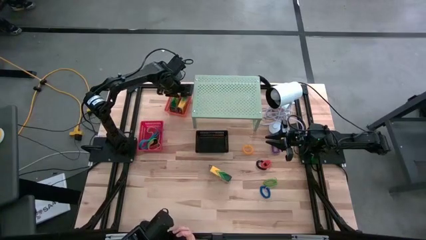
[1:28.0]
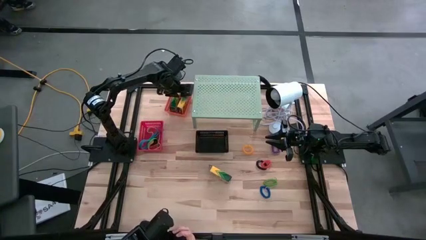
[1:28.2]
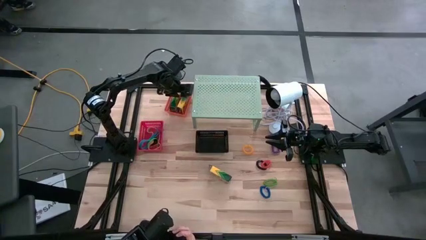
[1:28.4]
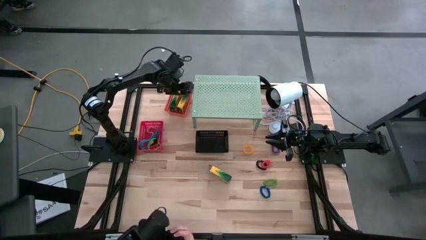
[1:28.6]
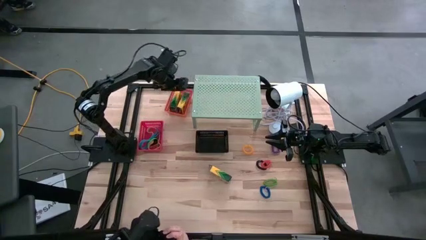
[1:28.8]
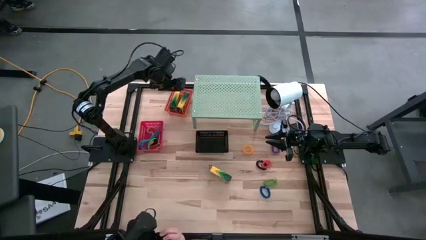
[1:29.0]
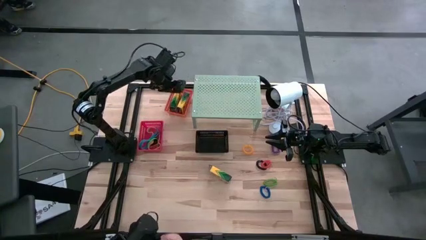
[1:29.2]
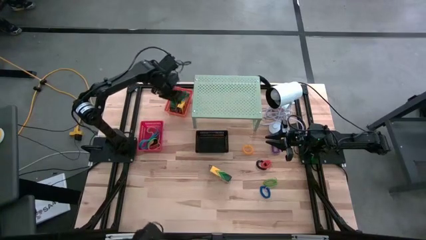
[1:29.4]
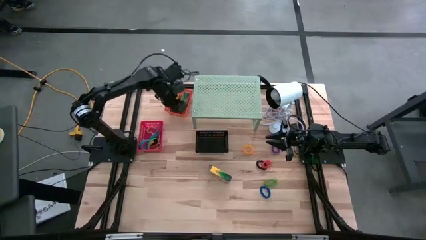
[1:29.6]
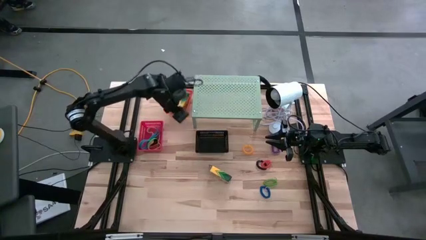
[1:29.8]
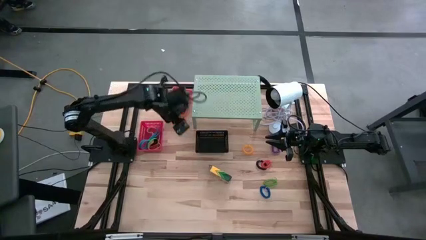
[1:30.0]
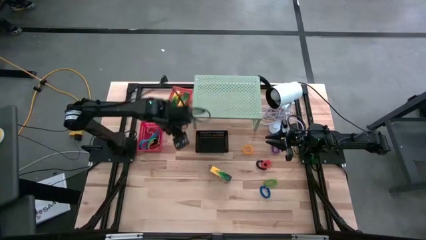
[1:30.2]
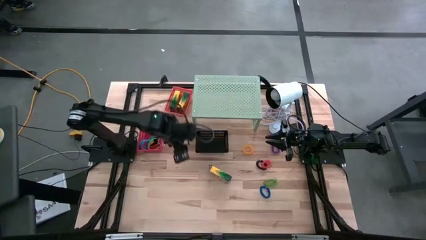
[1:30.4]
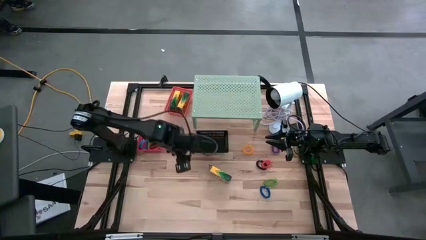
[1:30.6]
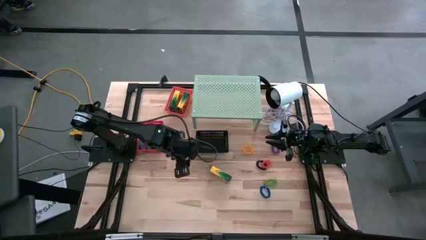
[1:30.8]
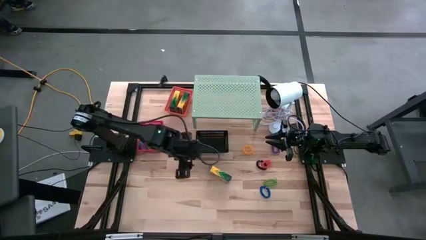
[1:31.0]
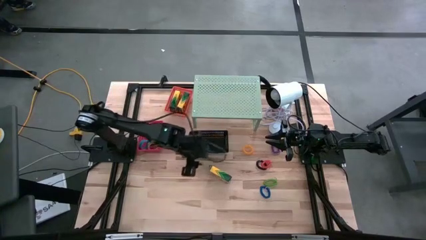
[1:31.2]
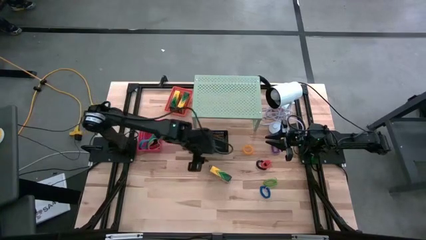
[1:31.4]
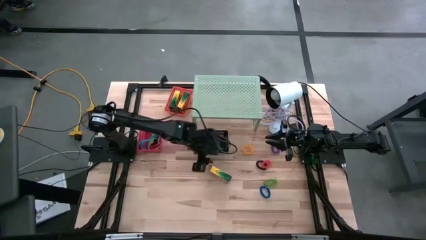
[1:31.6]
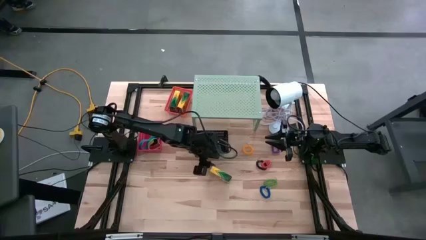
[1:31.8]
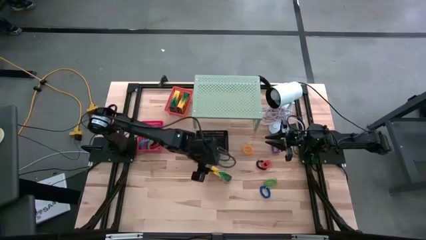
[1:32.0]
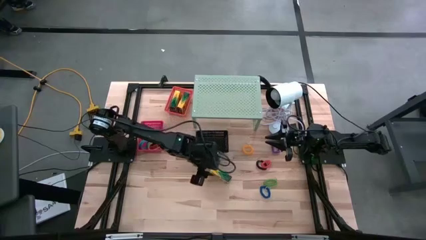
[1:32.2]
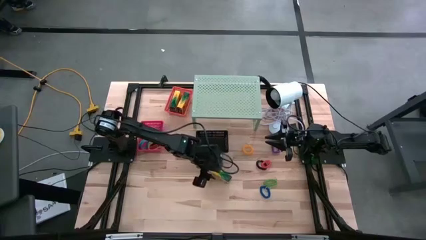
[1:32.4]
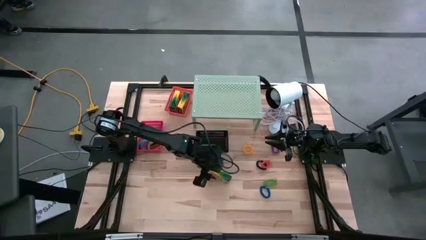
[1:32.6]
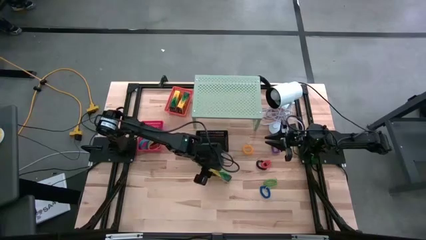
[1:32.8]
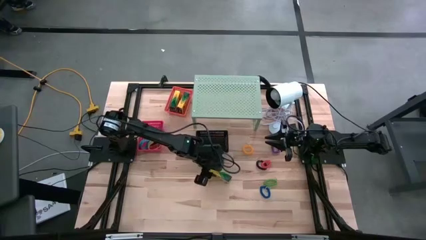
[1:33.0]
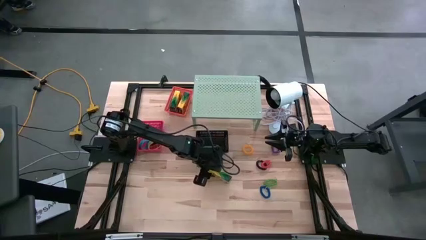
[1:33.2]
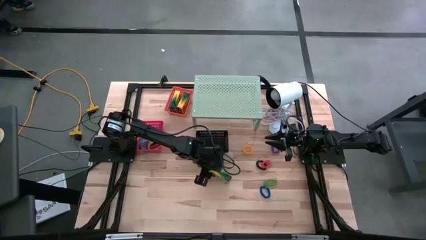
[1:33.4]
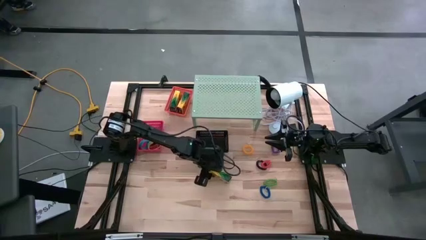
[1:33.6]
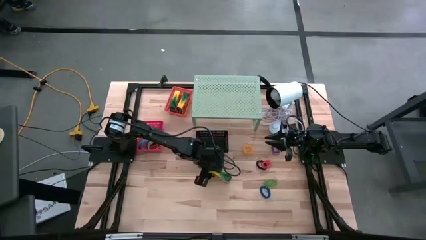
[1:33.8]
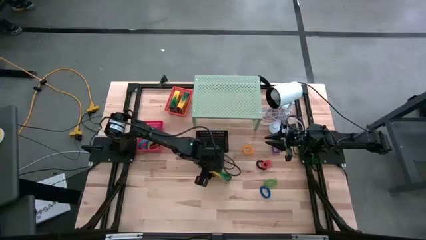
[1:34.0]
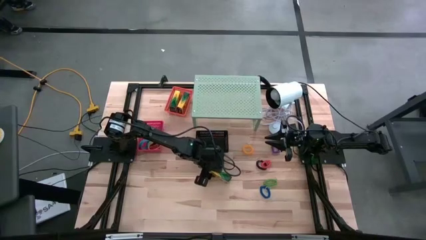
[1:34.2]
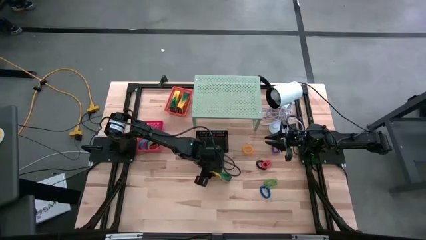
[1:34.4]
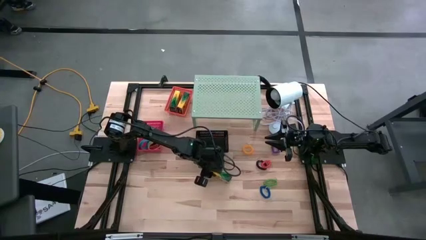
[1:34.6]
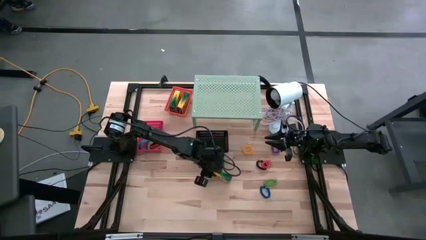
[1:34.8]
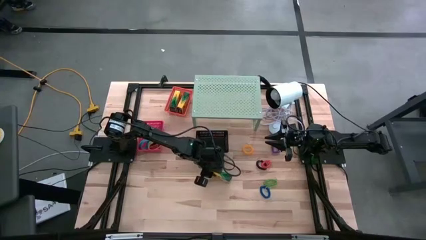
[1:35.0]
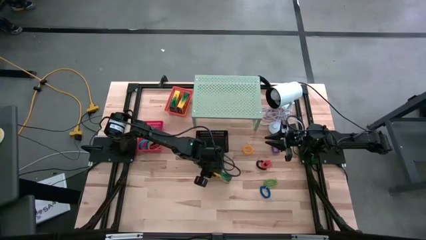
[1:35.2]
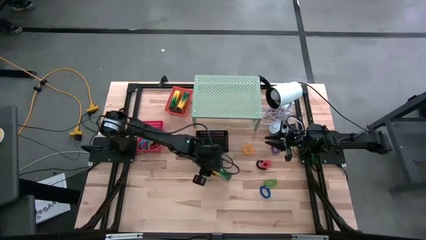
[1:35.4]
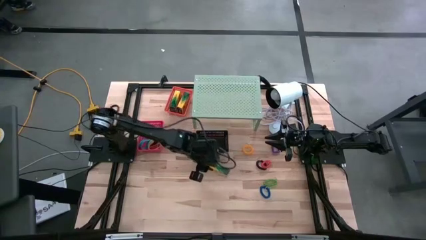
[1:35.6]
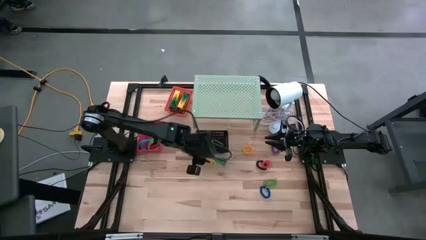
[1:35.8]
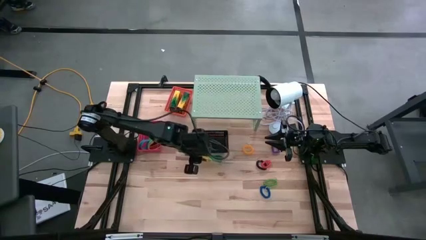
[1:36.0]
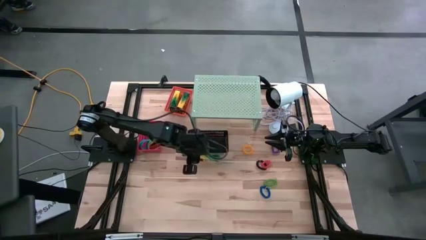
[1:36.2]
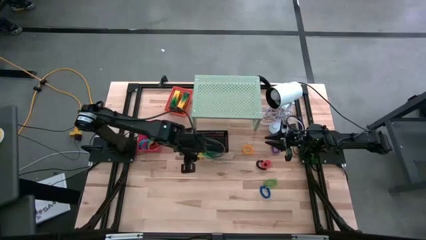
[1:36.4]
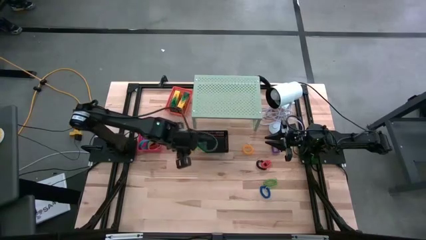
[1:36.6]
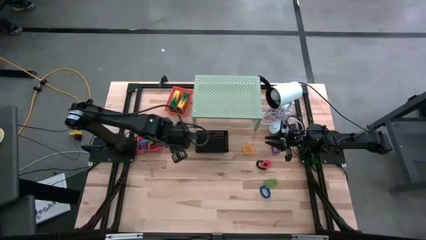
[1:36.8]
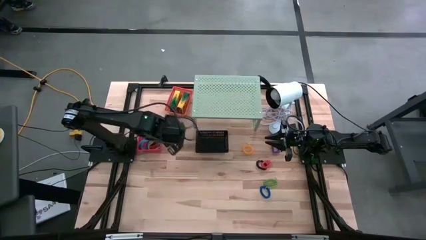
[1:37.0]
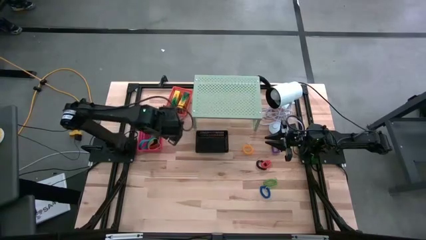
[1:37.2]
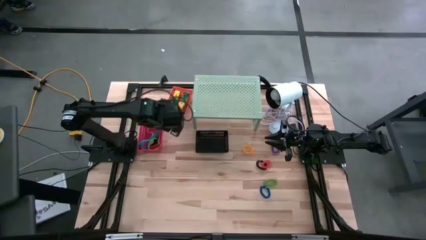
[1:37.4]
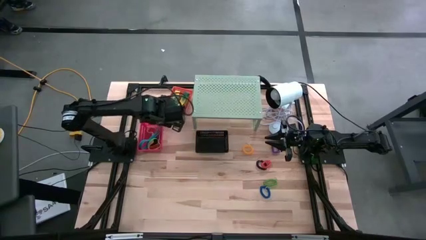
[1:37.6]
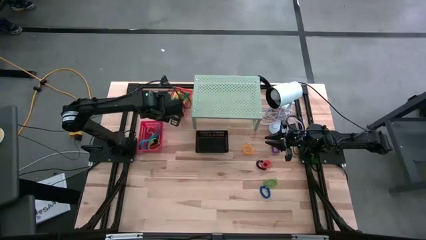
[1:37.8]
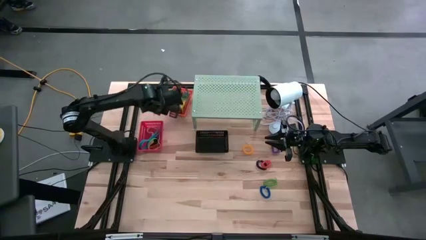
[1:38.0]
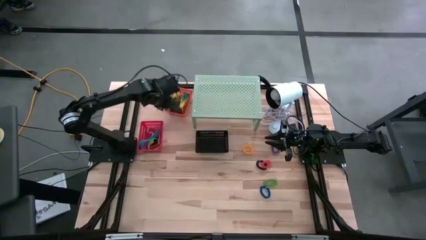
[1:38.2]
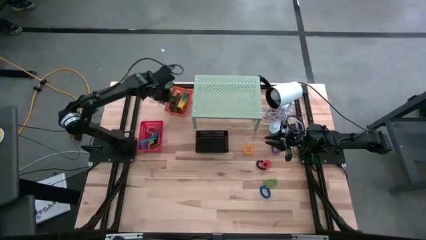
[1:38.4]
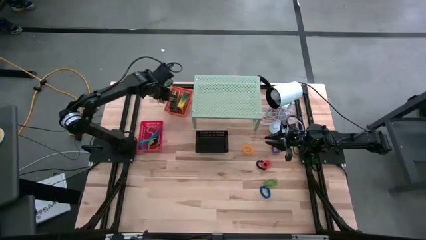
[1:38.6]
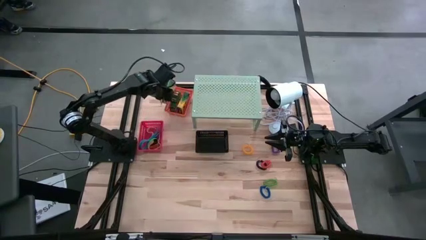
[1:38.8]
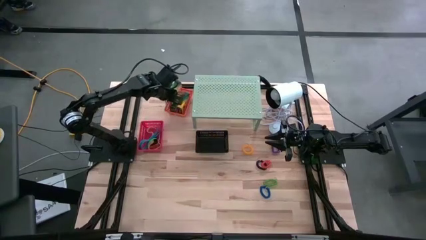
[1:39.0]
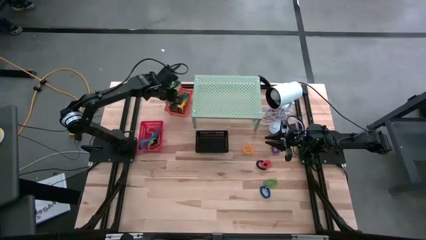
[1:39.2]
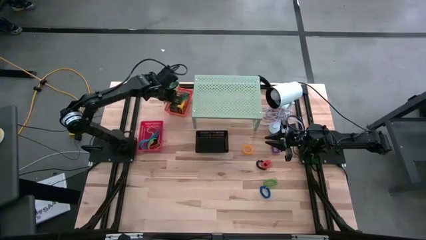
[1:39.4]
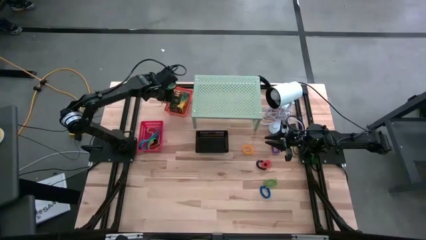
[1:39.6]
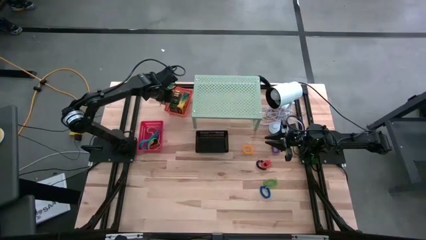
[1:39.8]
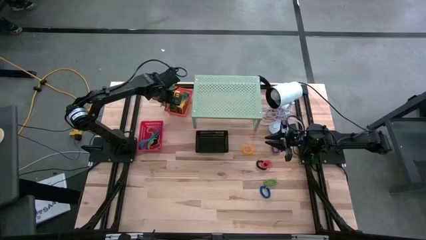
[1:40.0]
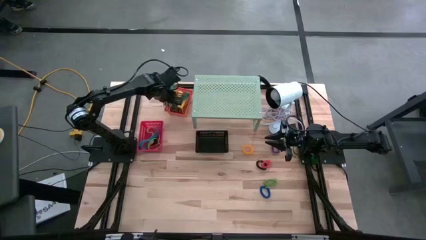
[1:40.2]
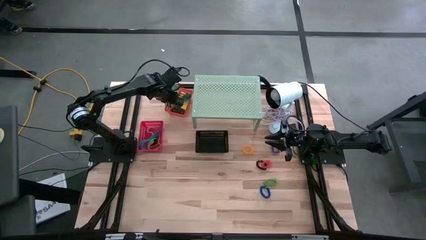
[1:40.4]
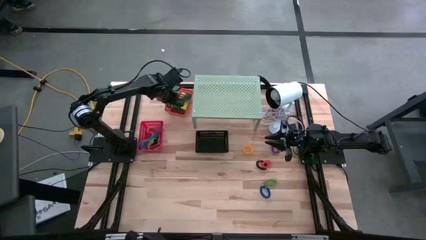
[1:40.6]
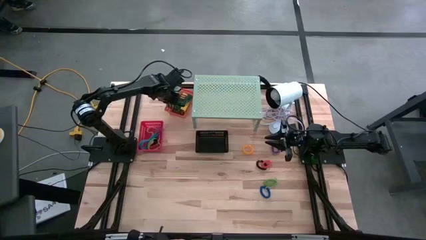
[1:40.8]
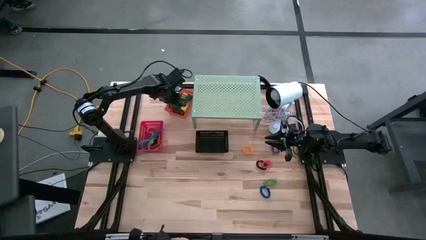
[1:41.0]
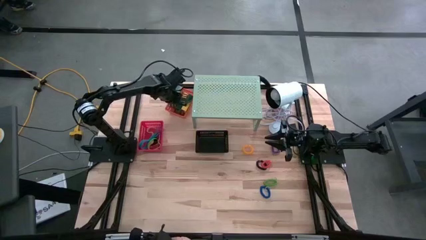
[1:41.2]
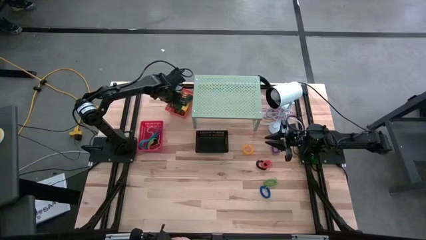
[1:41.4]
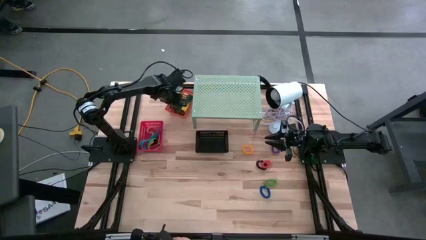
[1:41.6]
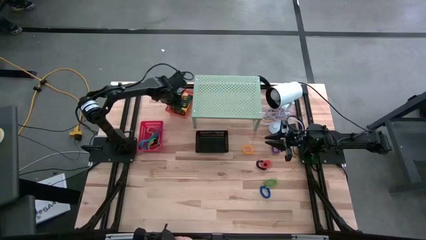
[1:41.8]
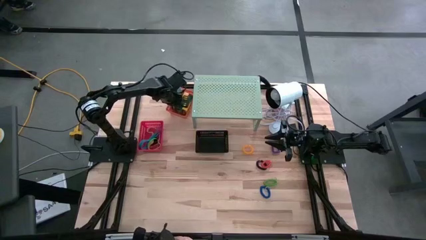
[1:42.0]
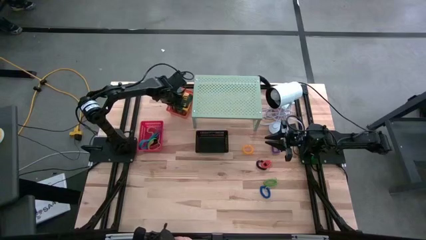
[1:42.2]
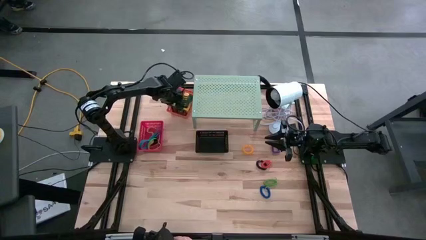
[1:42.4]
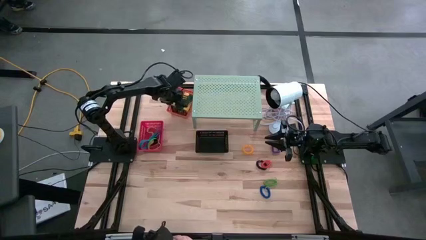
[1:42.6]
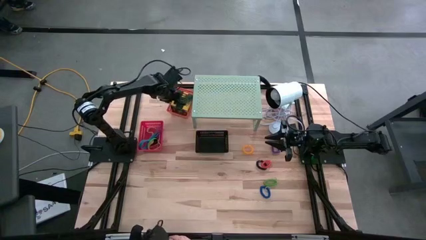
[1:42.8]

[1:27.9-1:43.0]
Task: Pick & Place Office Desk Supplies
Put the crayon box into the orange bin on the shelf

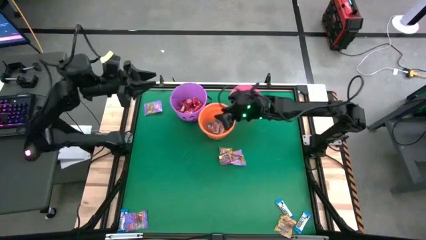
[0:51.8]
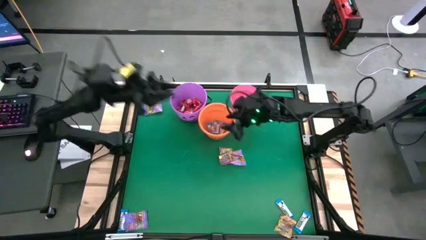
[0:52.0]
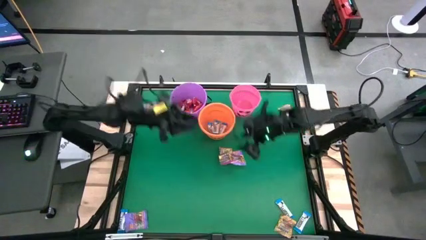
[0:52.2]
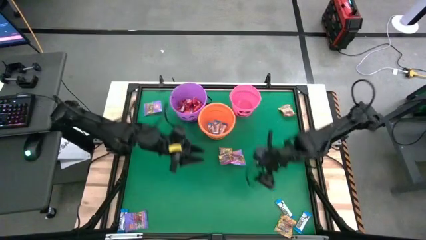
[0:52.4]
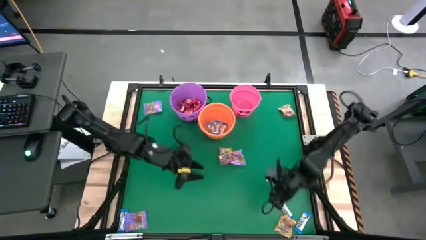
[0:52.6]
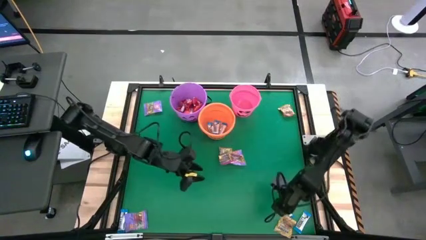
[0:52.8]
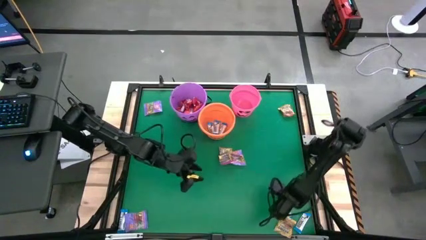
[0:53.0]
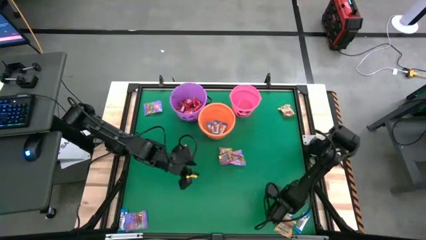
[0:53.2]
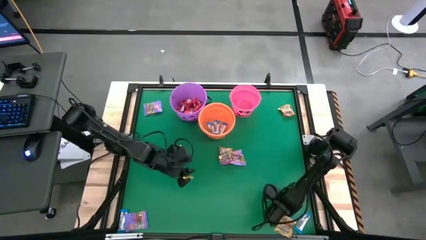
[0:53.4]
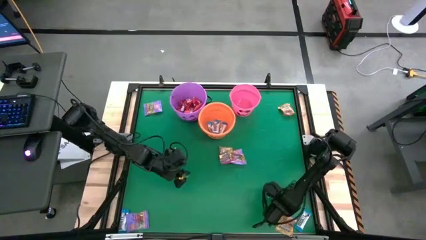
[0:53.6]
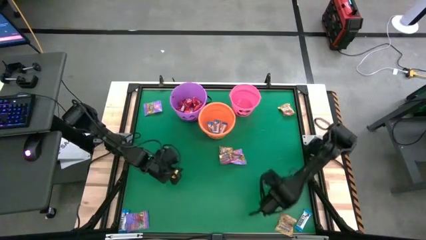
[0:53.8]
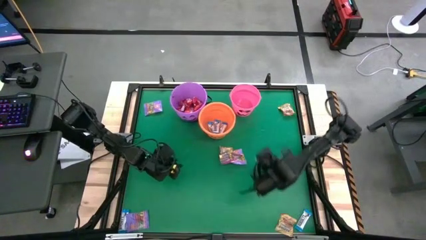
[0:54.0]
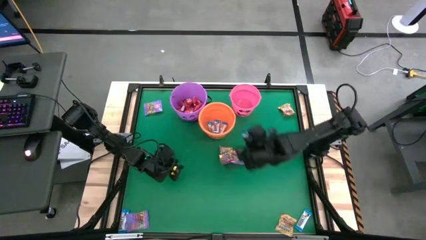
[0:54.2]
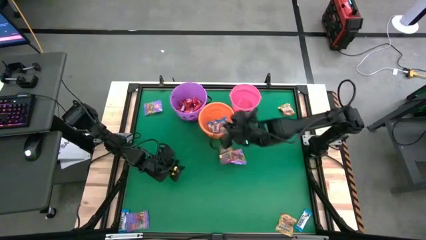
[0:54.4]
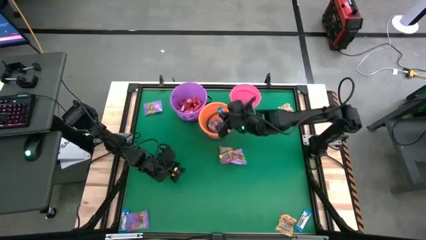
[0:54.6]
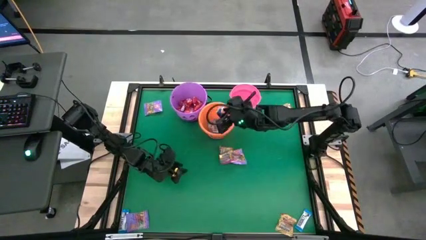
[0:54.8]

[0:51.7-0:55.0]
Task: Sort candy by brand, put in halloween buckets
Put the white chocolate into the orange bucket
